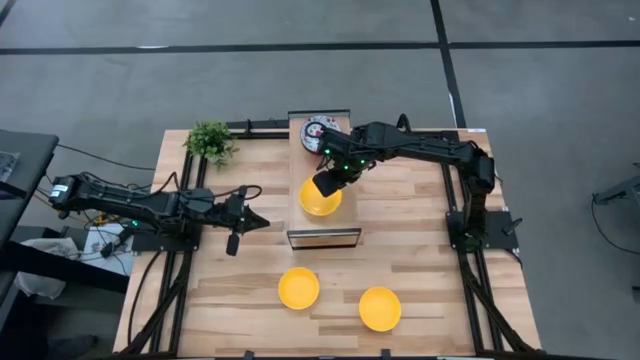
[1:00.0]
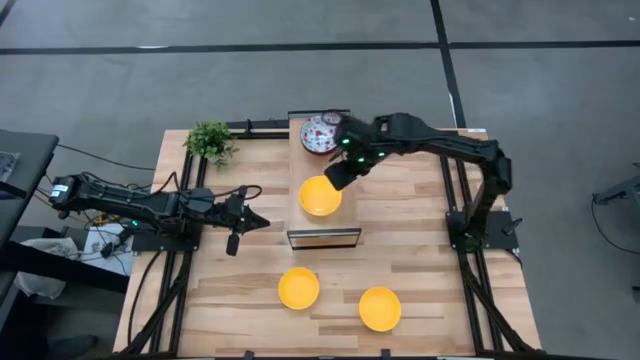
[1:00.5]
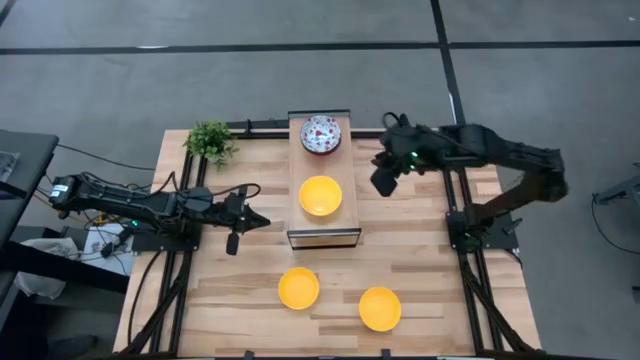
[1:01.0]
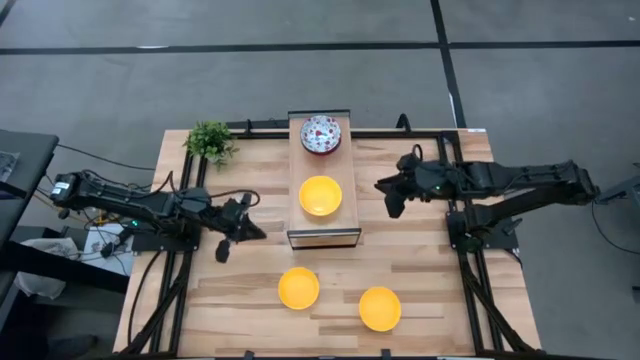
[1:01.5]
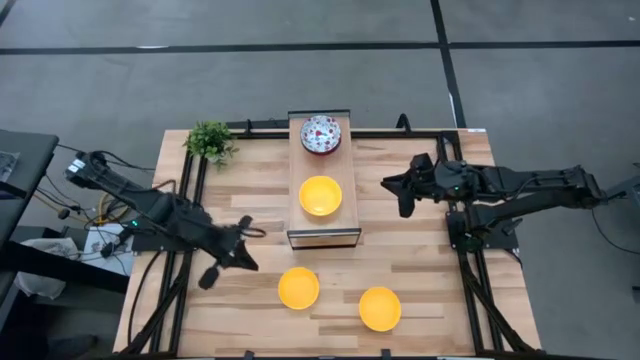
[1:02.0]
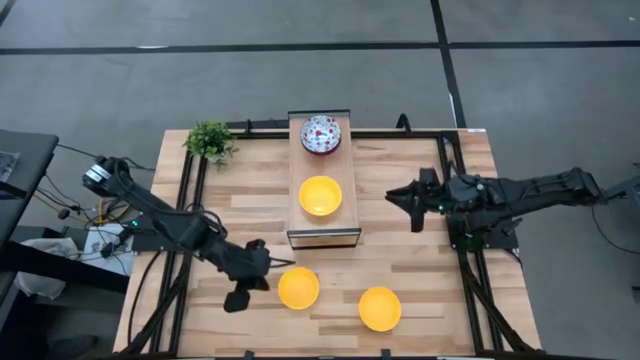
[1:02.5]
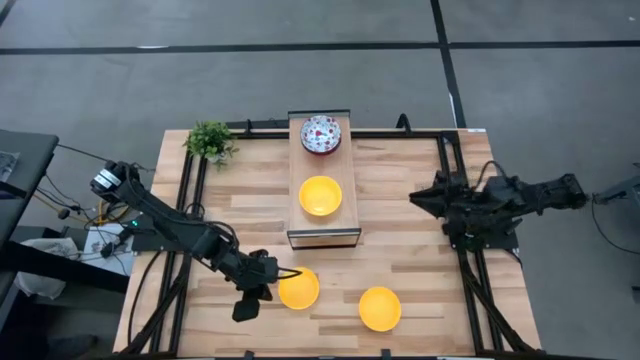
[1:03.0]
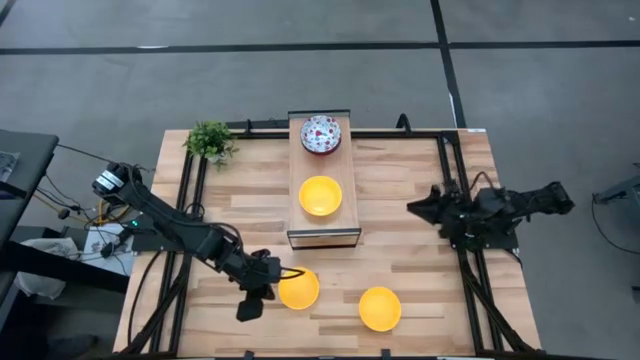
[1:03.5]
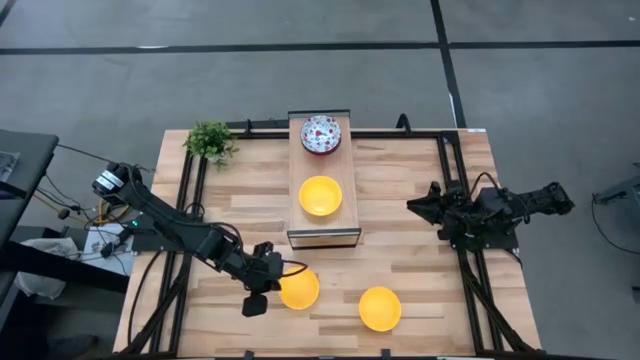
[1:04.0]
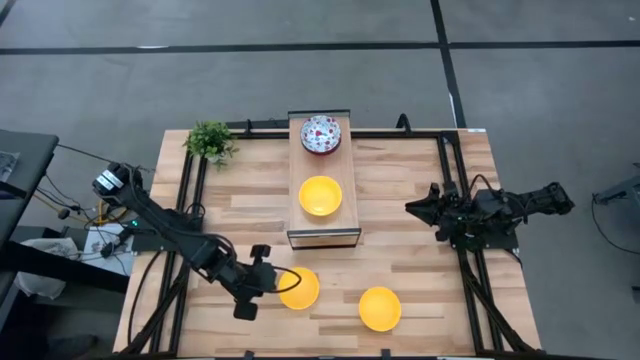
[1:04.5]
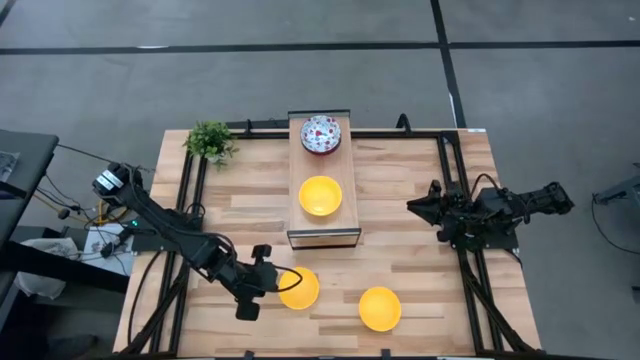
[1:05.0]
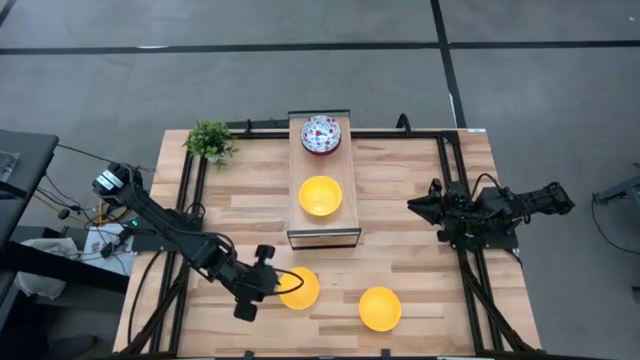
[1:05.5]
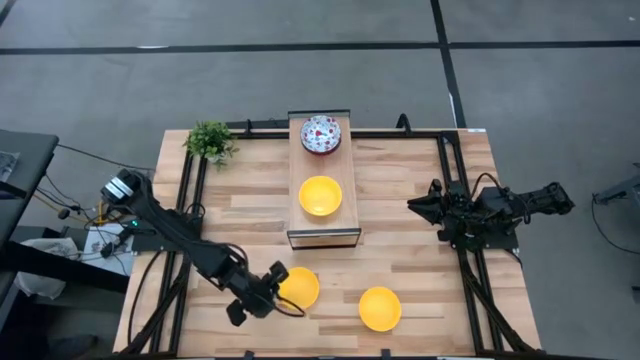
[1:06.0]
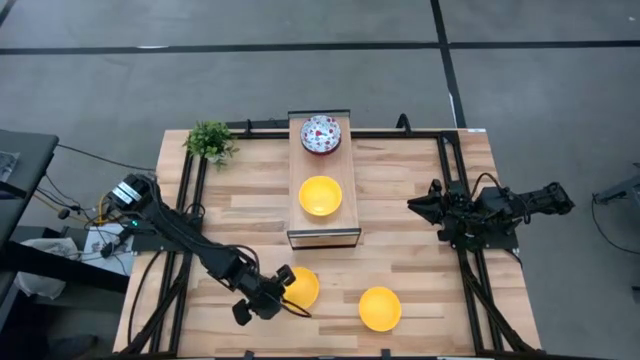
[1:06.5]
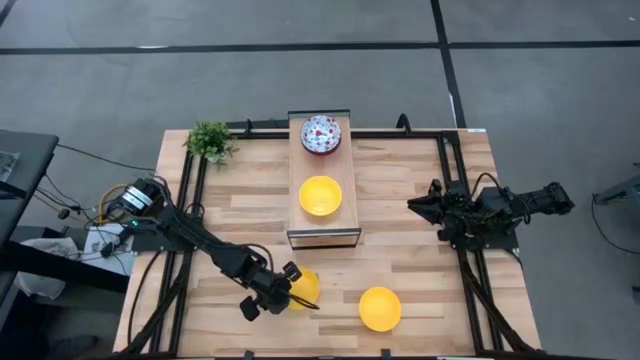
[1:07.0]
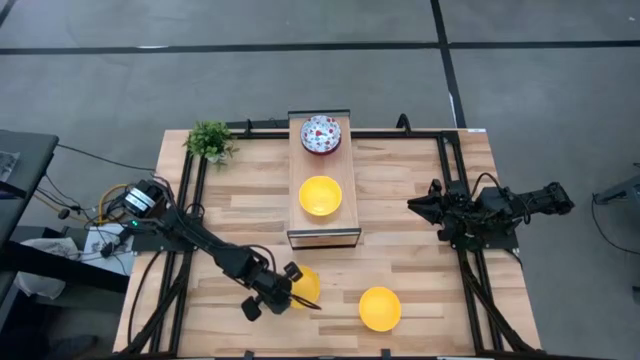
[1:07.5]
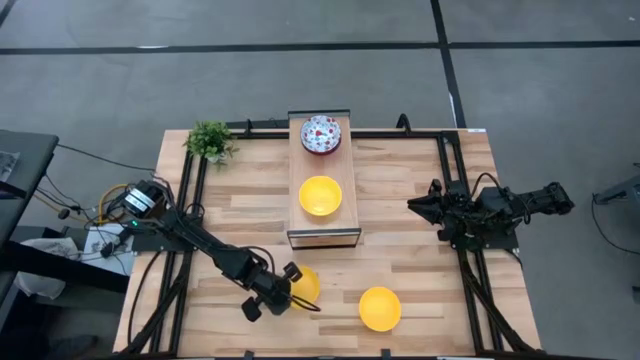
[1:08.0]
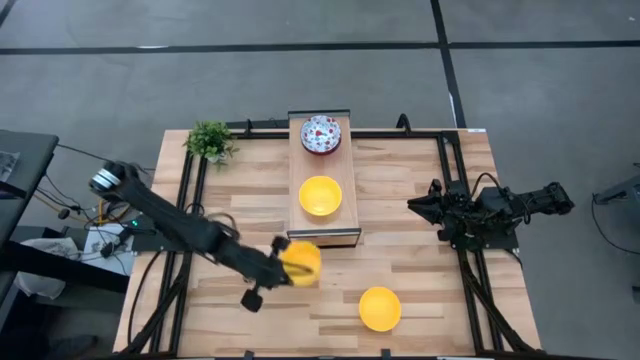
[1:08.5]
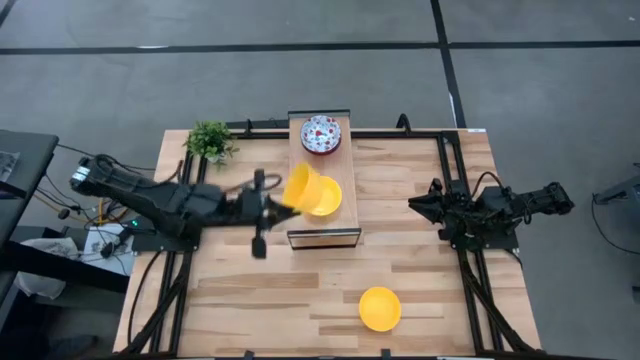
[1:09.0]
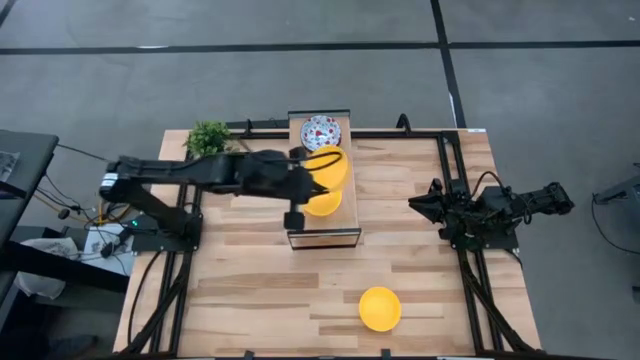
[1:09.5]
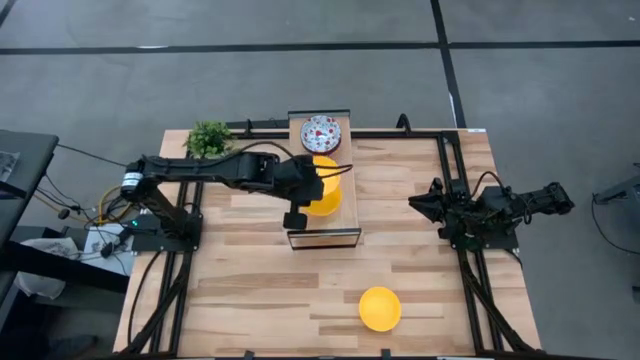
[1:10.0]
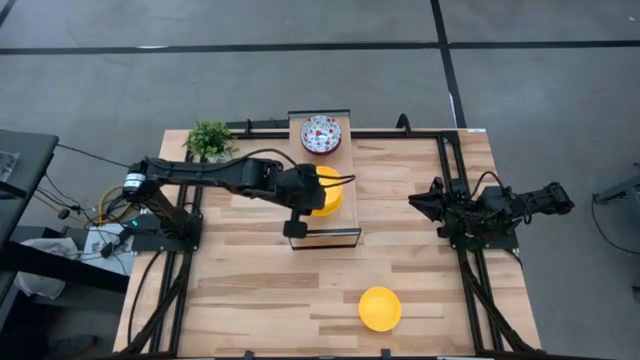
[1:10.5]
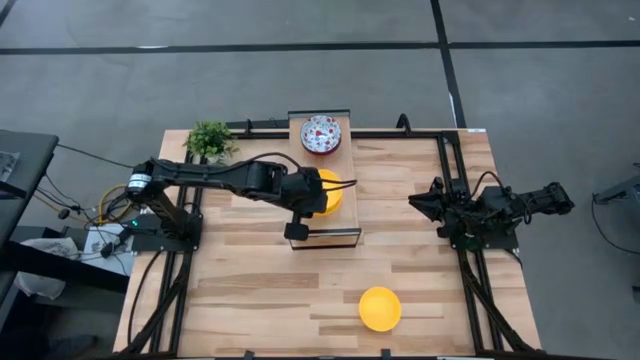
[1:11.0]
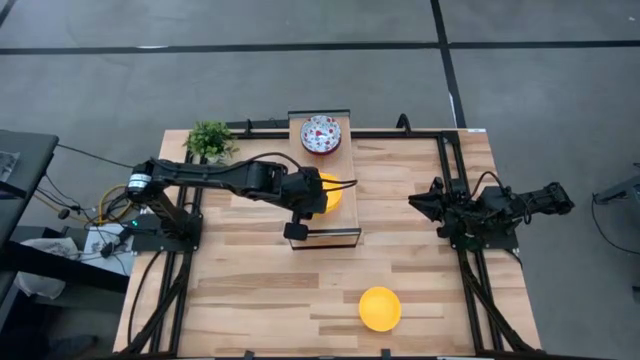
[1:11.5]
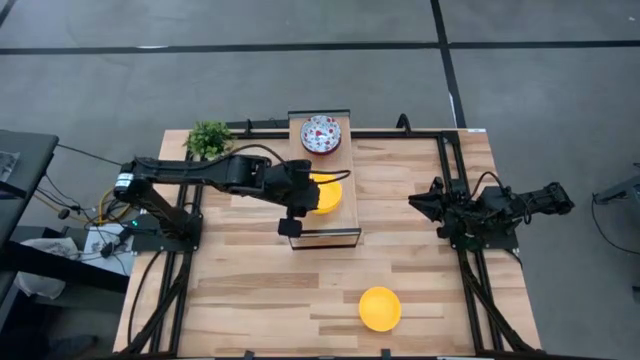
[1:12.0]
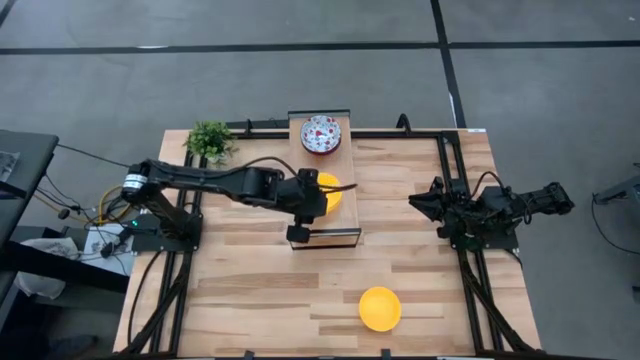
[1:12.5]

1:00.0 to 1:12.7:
Task: Pick & Place Mini bowls
Stack the left yellow bowl on the other yellow bowl on the shelf

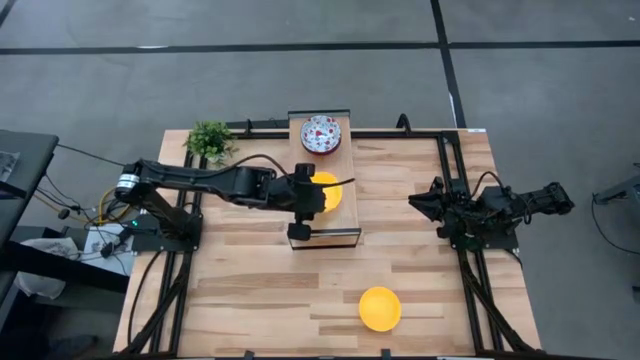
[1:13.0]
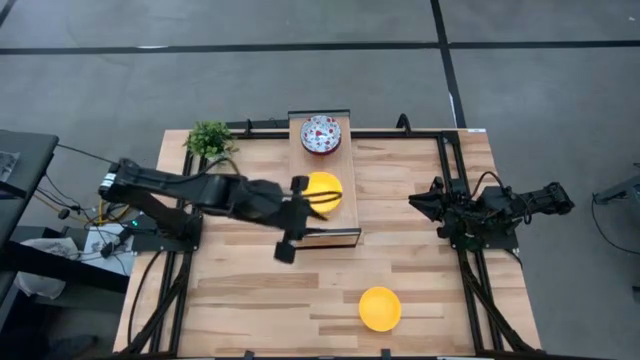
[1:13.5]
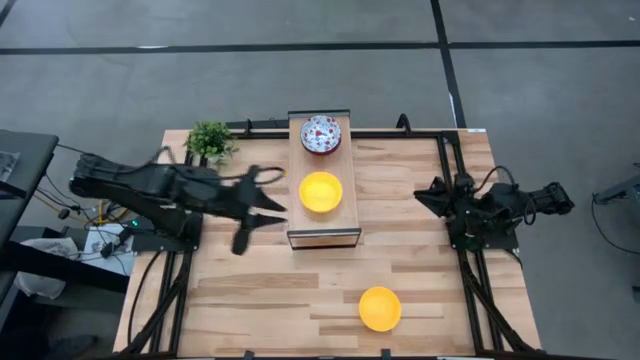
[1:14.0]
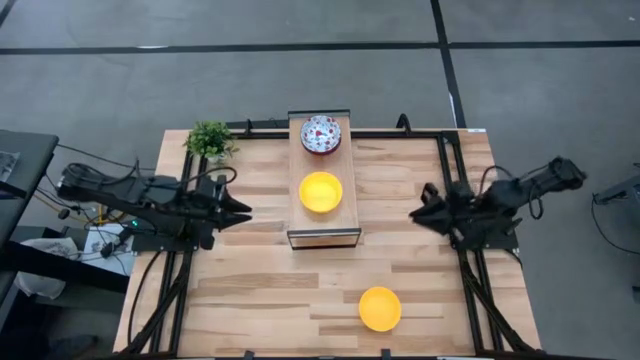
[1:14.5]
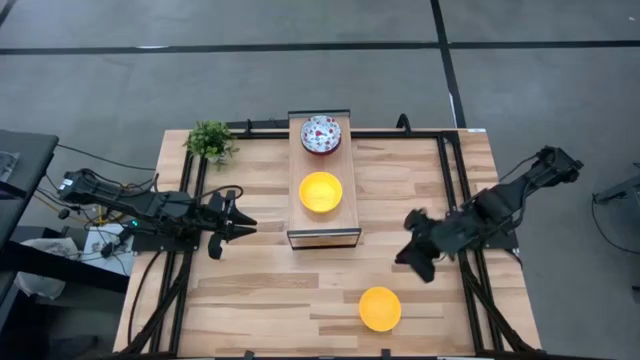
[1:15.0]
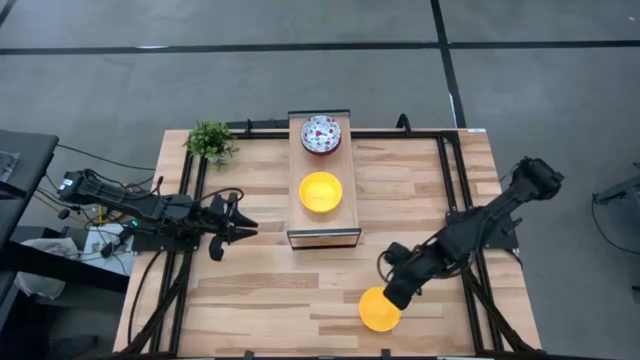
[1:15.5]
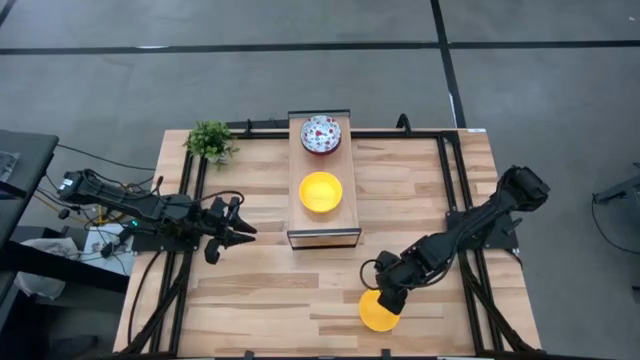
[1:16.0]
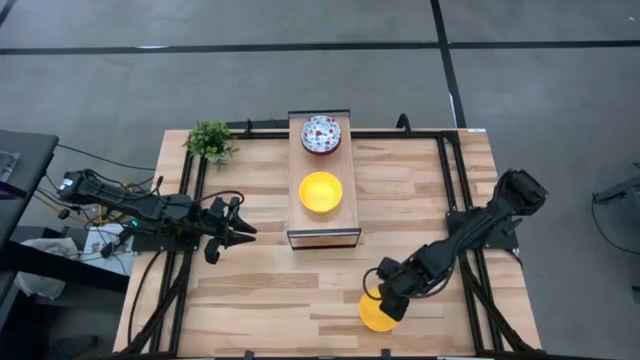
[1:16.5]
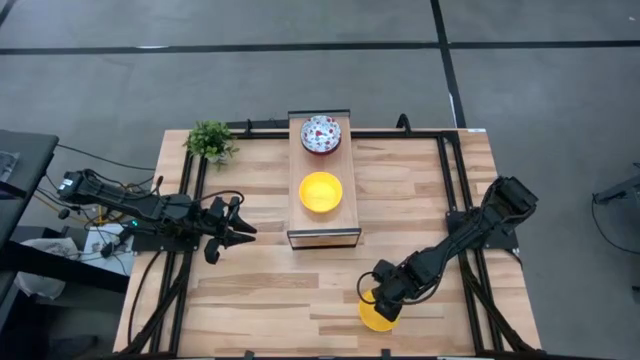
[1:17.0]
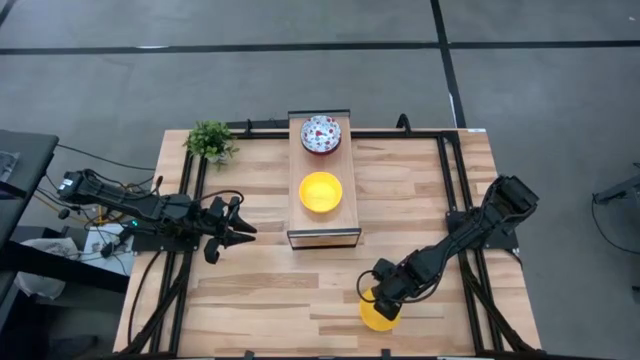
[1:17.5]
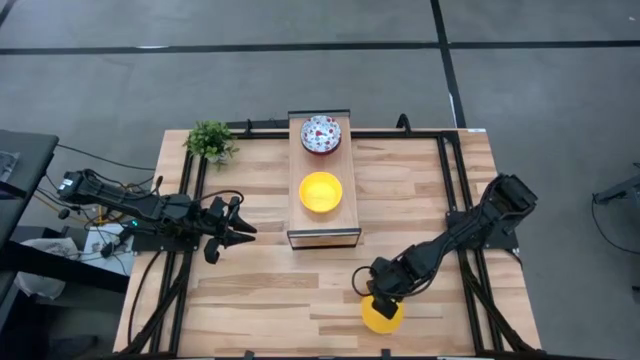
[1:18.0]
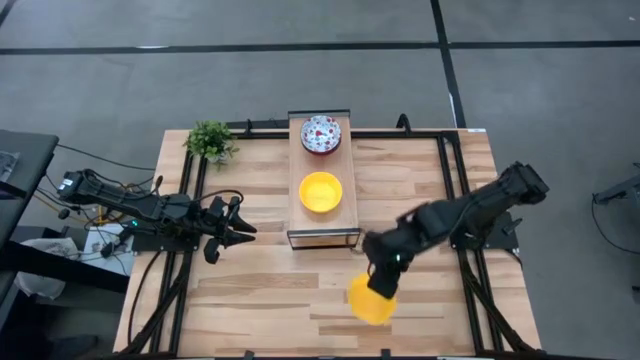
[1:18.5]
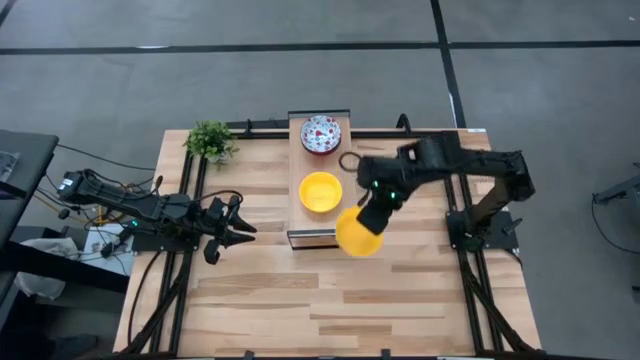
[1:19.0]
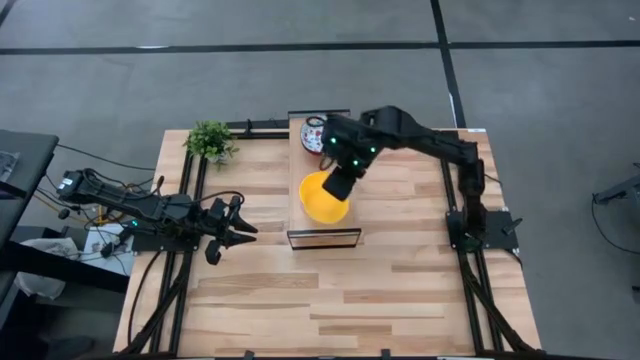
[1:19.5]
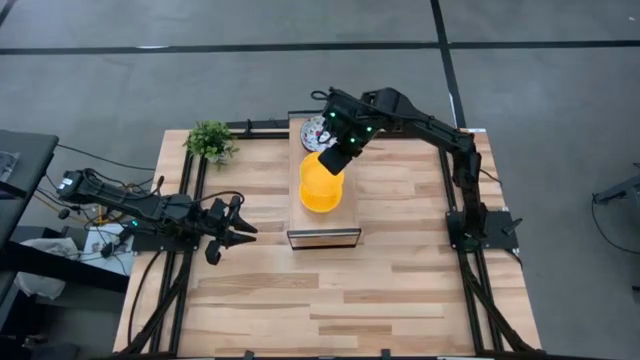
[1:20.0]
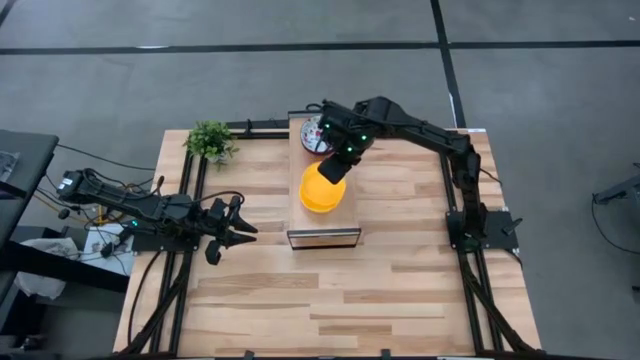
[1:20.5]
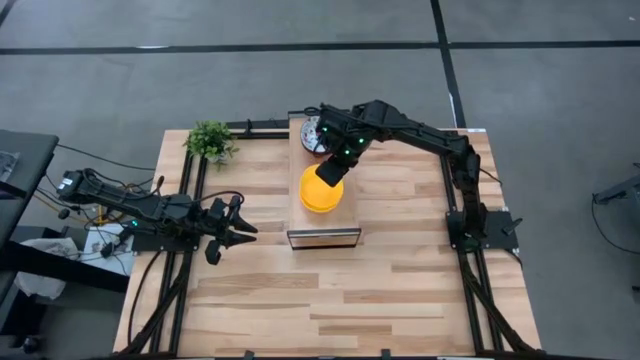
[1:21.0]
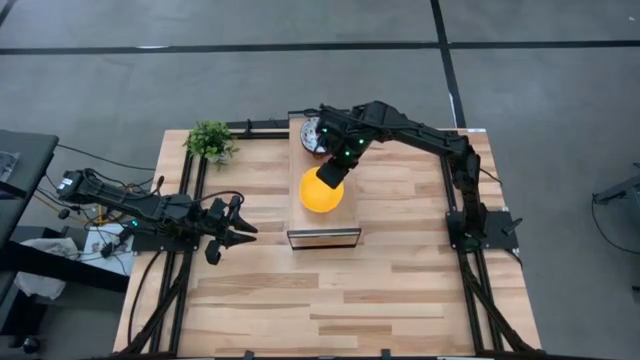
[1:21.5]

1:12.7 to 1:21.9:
Stack the yellow bowl on the other yellow bowls on the shelf
